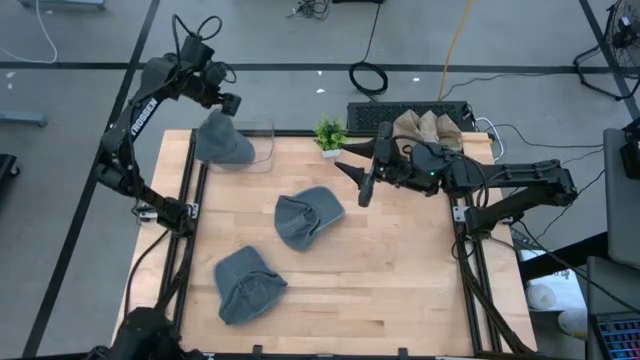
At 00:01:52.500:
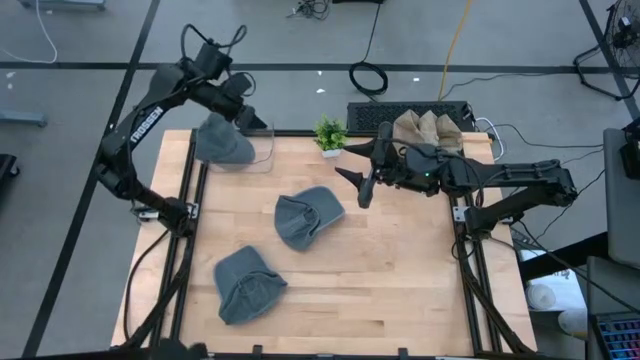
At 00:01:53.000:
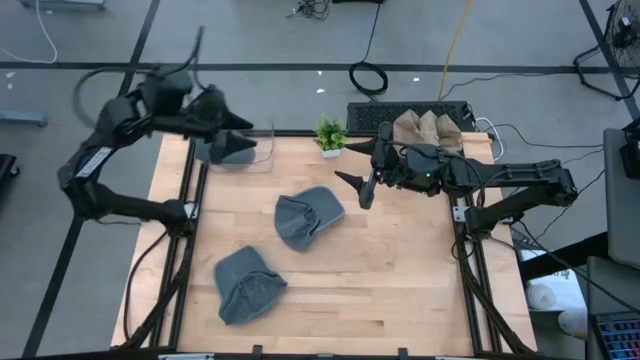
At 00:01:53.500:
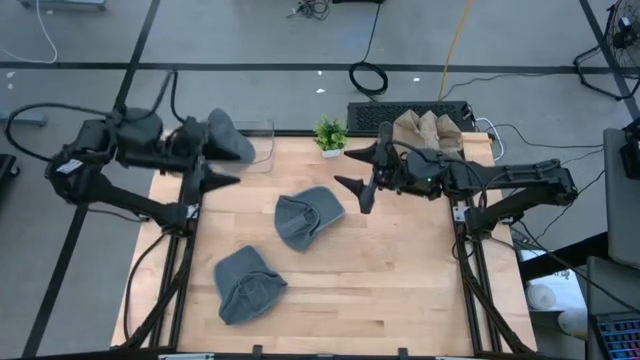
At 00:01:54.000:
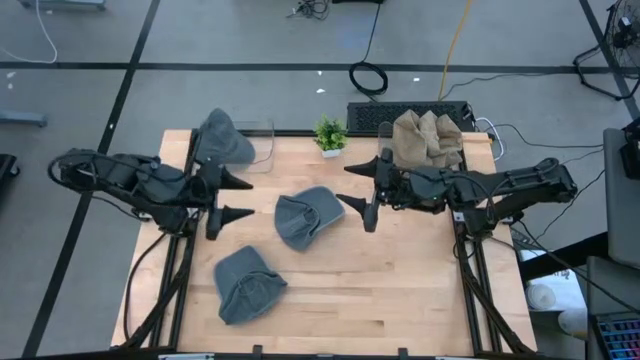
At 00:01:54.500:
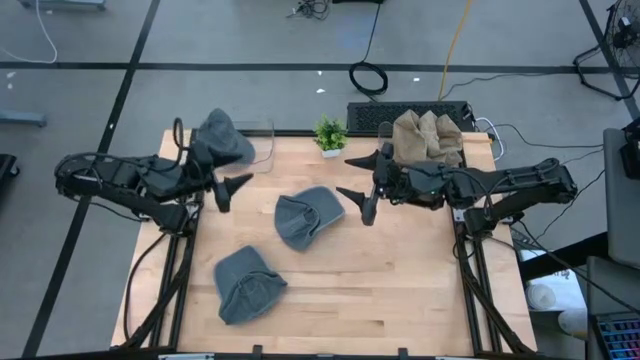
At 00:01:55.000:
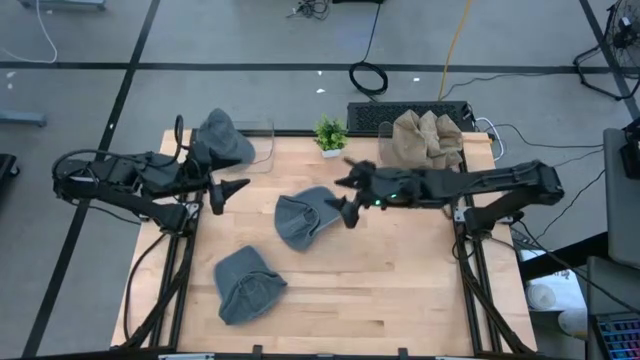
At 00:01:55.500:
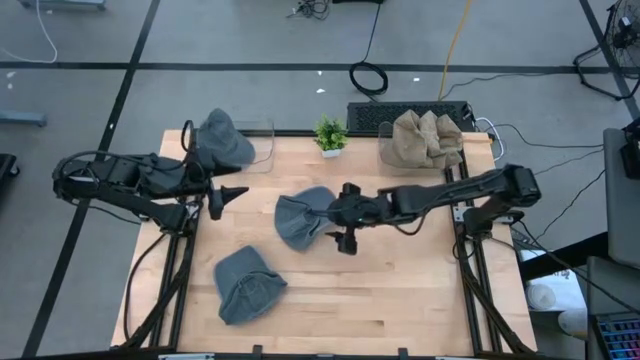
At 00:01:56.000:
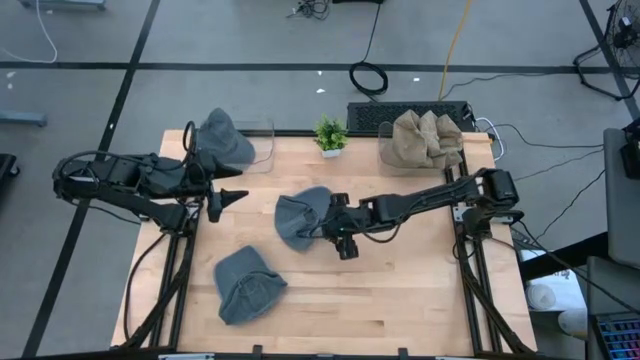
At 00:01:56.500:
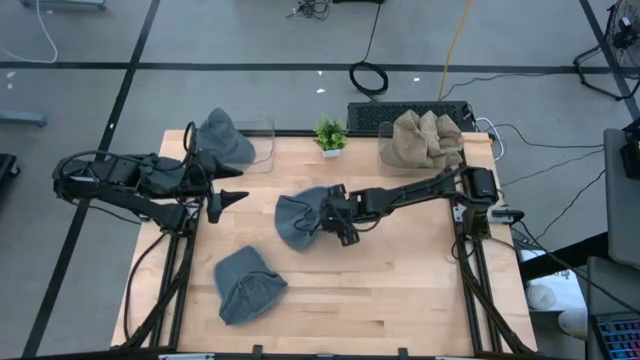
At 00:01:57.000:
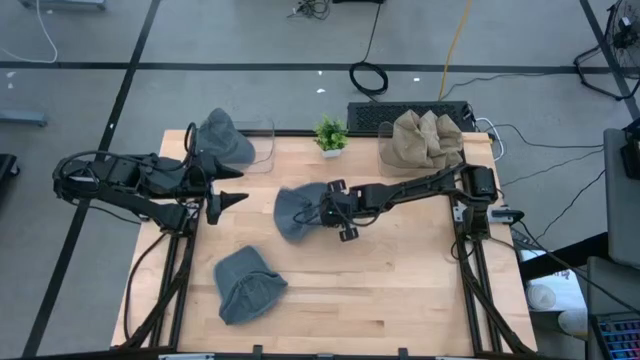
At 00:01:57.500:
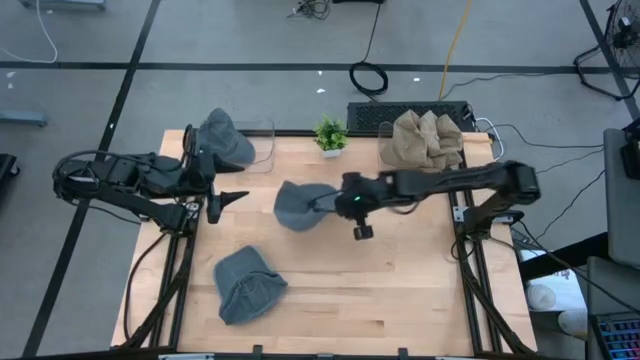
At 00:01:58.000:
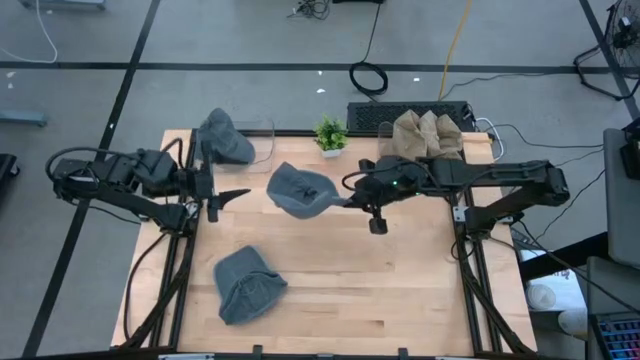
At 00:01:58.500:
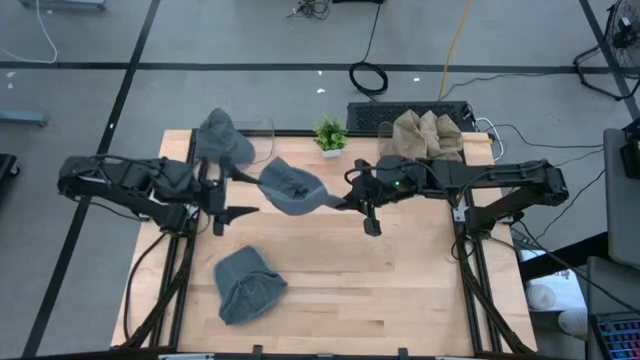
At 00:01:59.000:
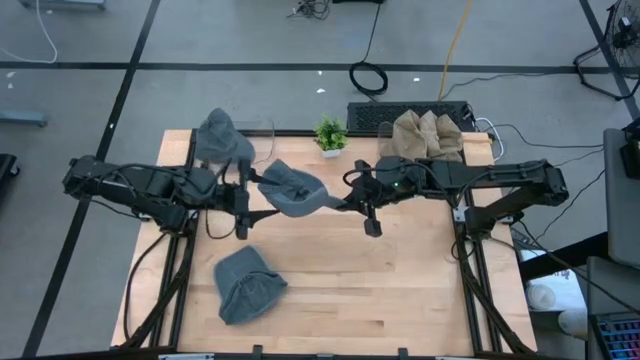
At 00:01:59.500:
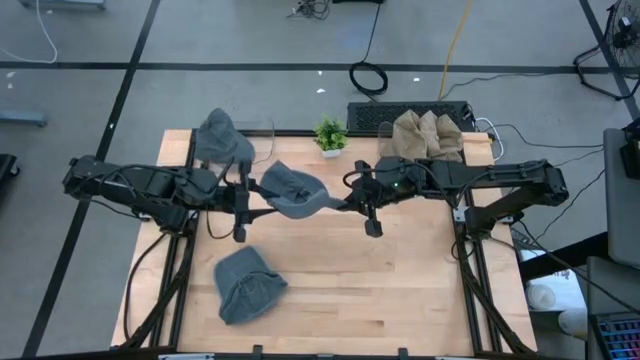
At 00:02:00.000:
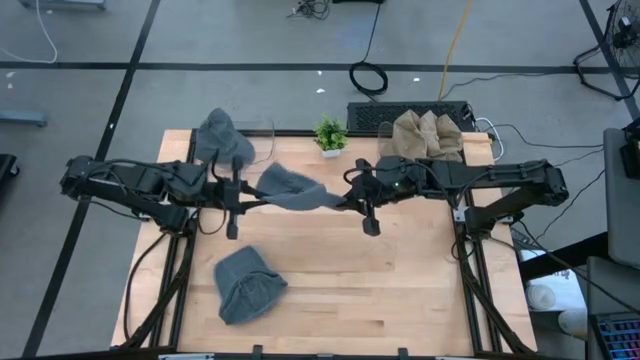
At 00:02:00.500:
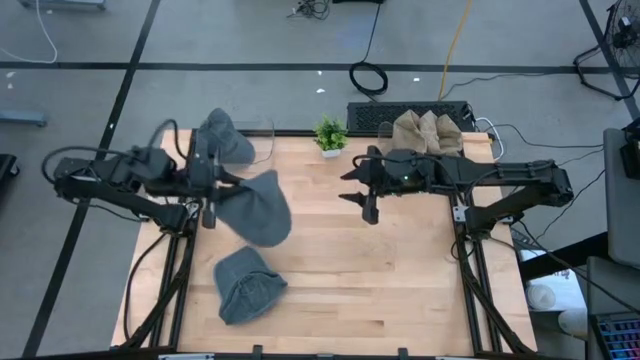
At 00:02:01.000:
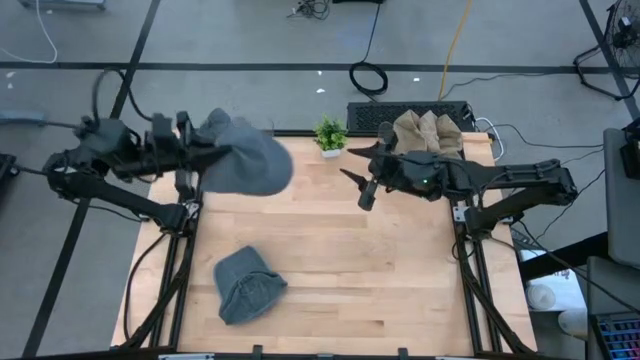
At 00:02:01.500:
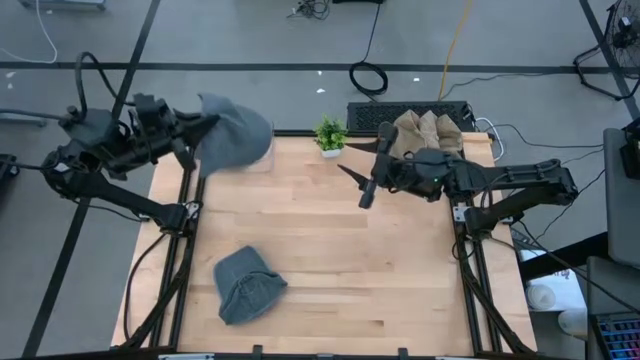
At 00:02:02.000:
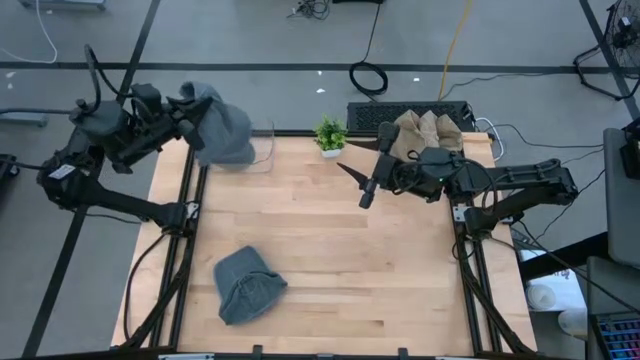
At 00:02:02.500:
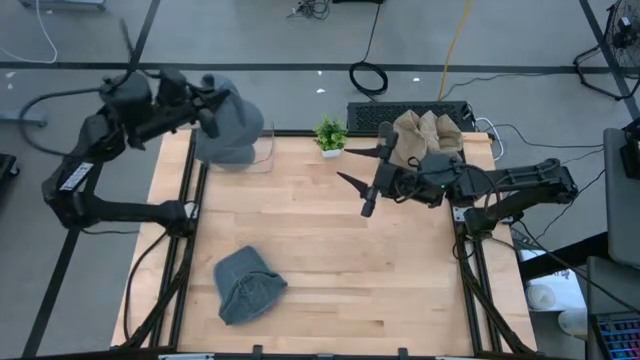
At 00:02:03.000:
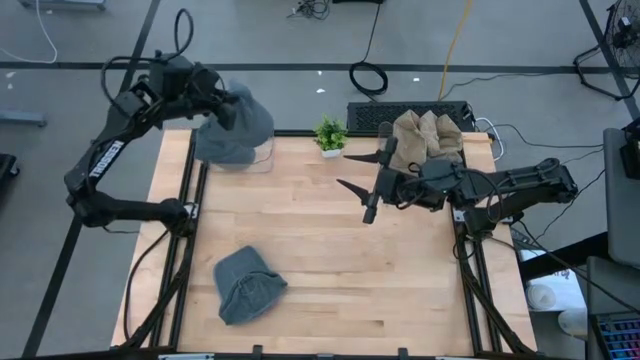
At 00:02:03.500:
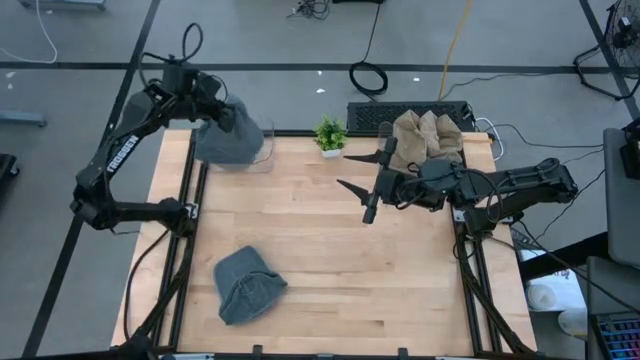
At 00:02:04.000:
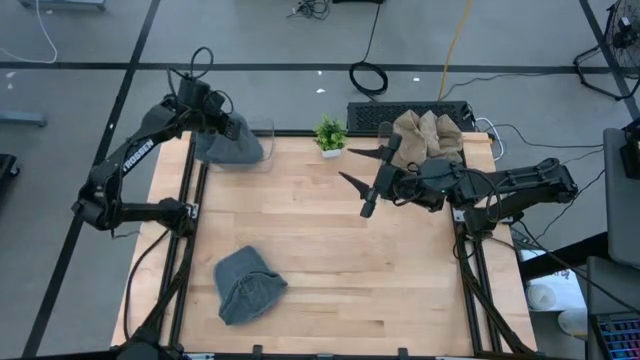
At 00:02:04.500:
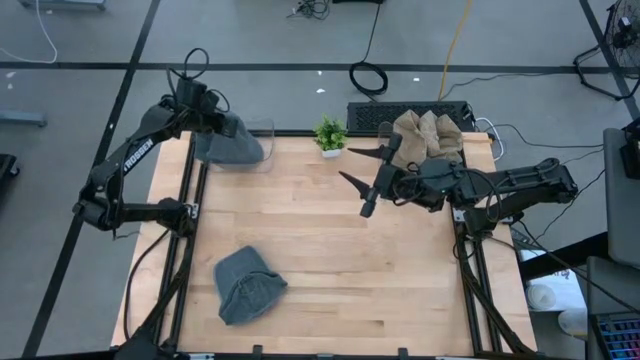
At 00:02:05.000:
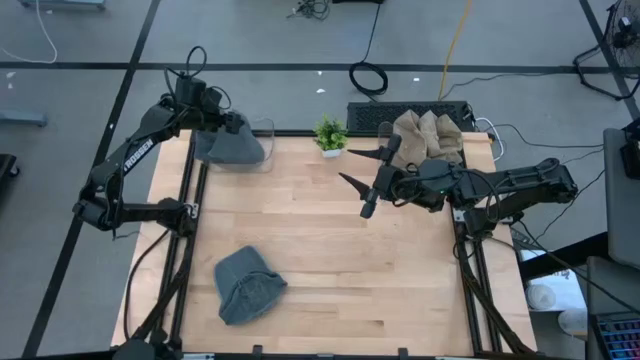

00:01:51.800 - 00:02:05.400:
Task: Pick & Place hat
Put the top blue cap into the left transparent bin

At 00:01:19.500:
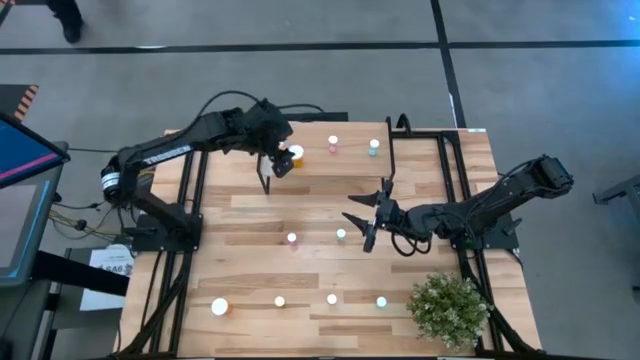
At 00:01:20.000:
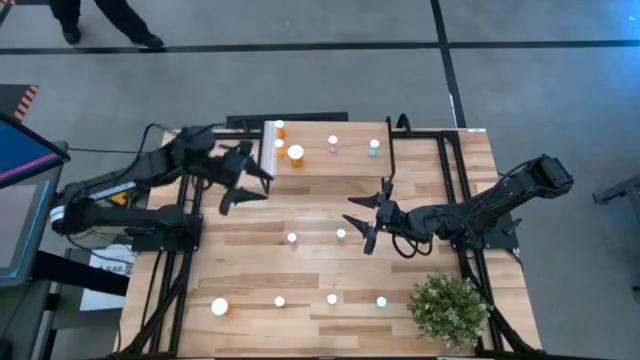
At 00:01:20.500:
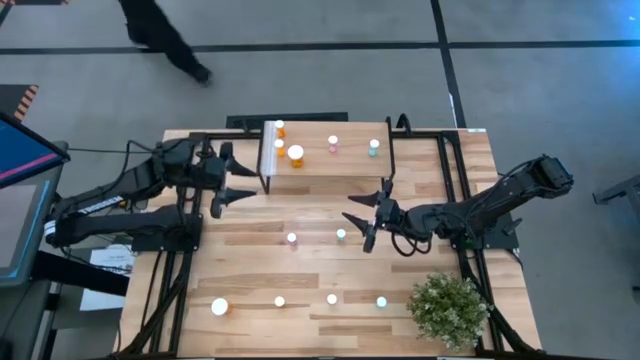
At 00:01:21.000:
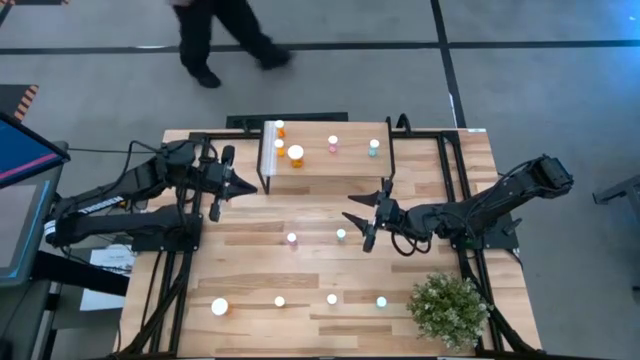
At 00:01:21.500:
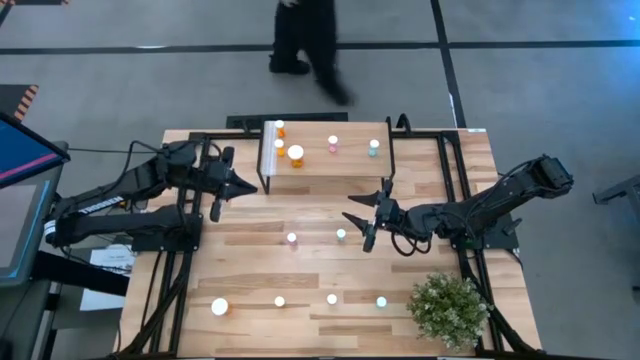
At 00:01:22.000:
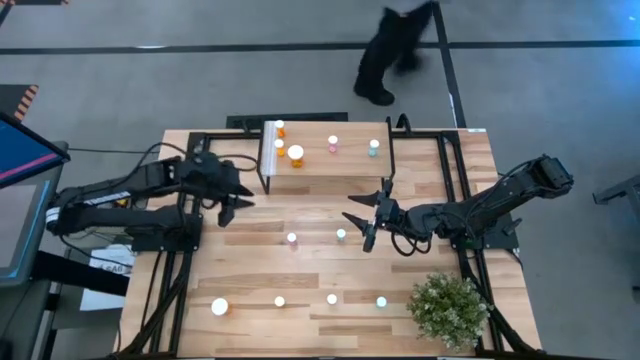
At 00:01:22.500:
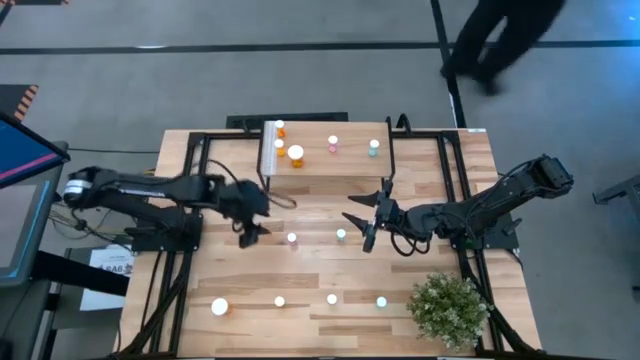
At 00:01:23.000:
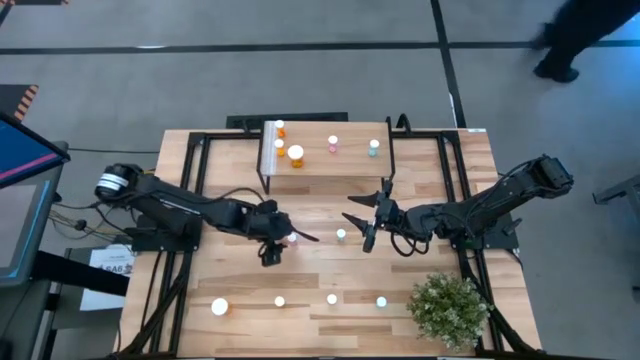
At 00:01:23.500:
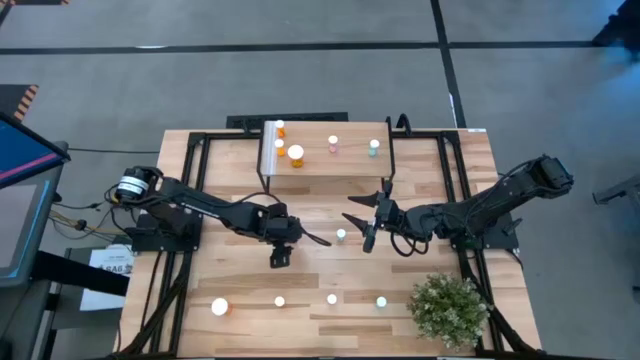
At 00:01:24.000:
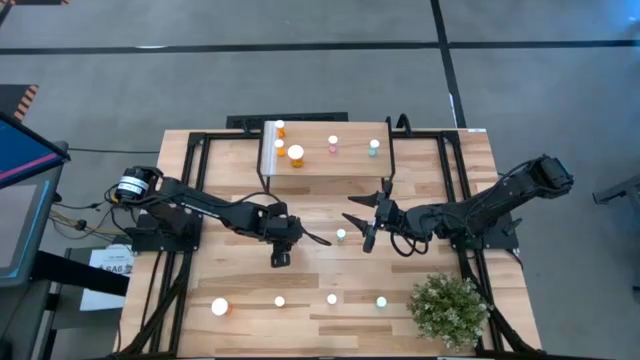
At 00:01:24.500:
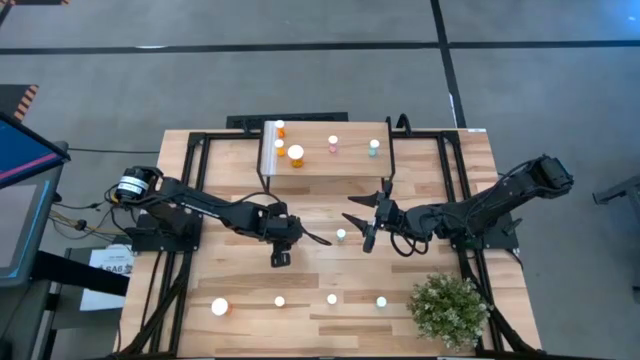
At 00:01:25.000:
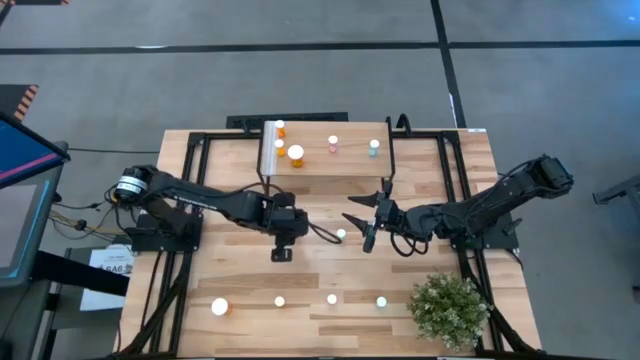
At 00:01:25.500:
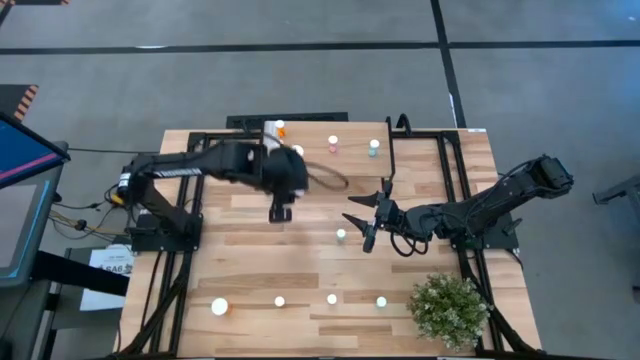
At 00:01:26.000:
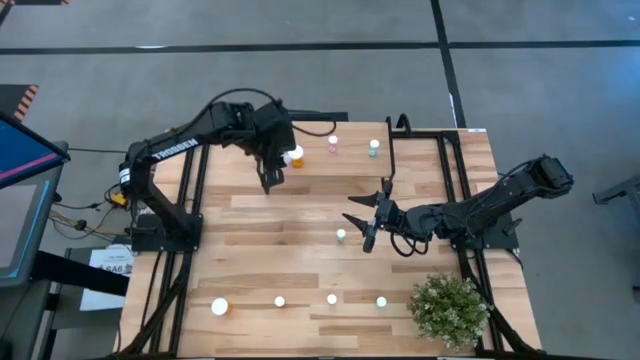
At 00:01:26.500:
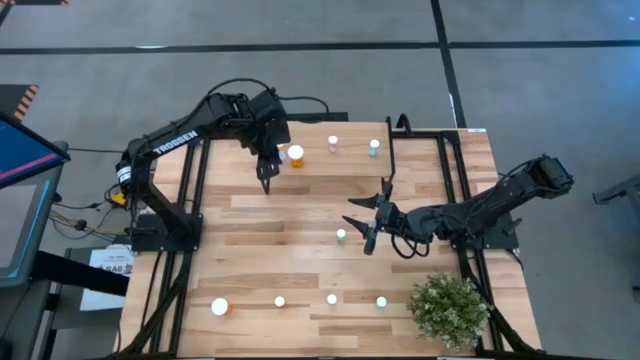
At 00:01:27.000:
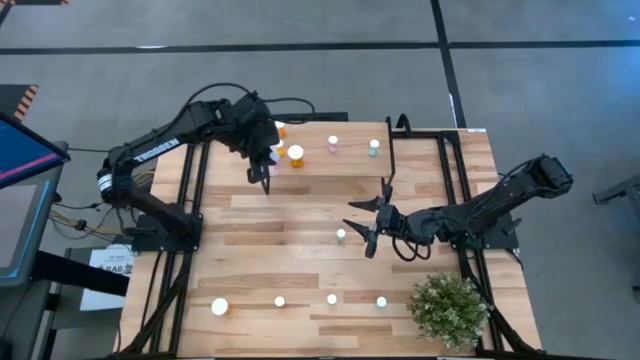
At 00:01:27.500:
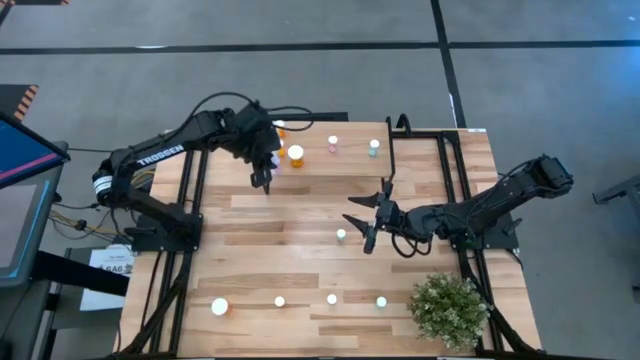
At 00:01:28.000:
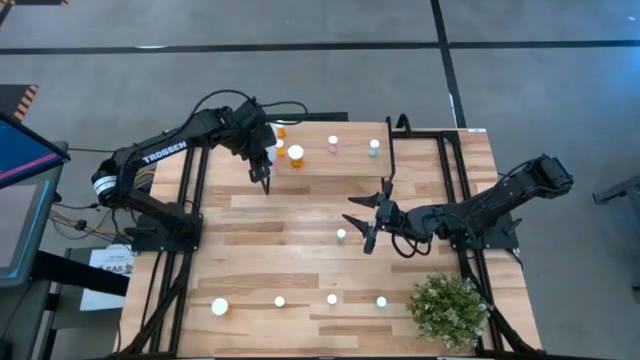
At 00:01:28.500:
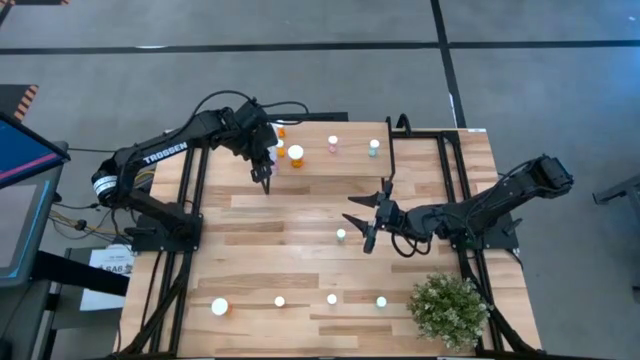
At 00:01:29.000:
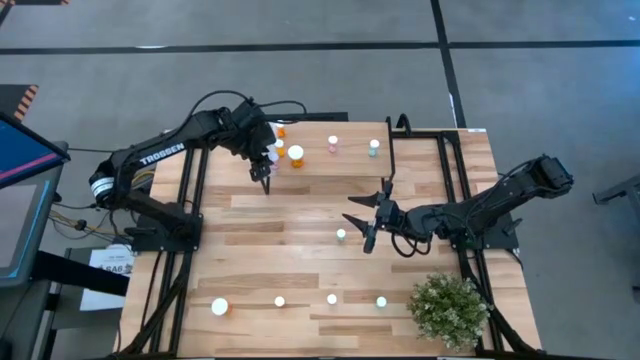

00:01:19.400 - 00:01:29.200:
Task: Pick and place medicine bottles onto shelf by color
Put the top pink pill bottle on the shelf
